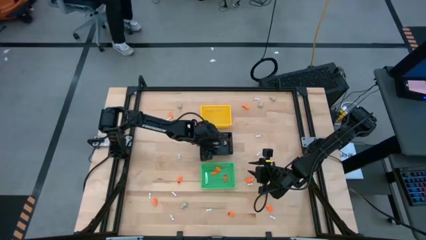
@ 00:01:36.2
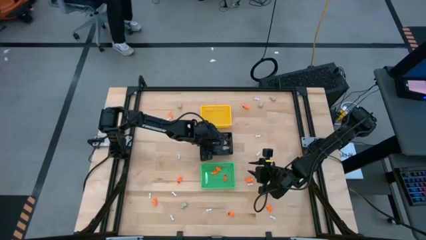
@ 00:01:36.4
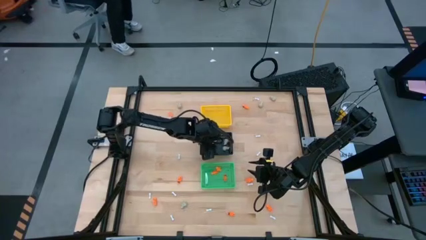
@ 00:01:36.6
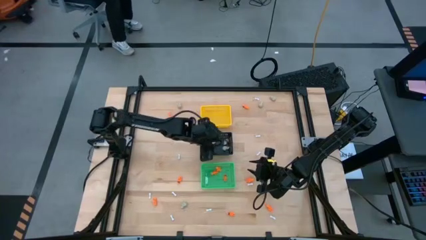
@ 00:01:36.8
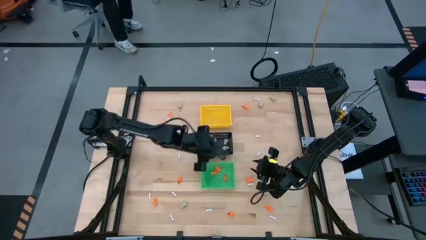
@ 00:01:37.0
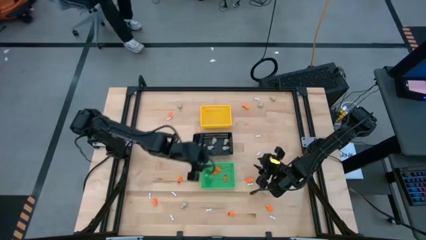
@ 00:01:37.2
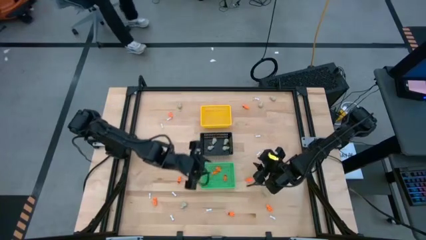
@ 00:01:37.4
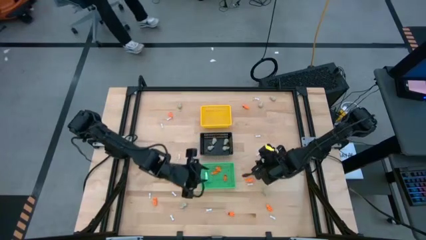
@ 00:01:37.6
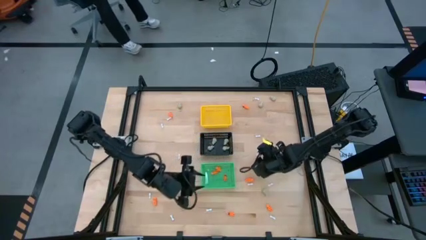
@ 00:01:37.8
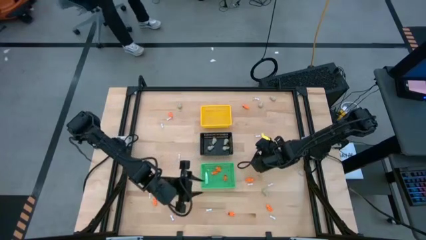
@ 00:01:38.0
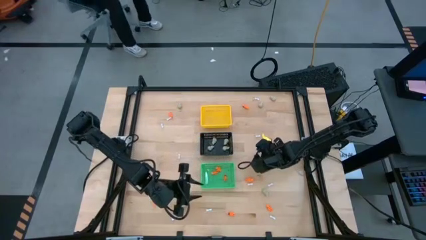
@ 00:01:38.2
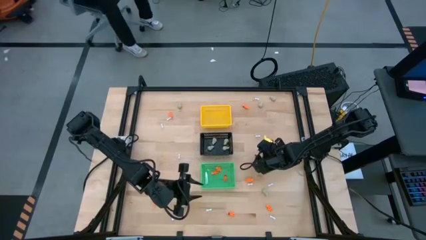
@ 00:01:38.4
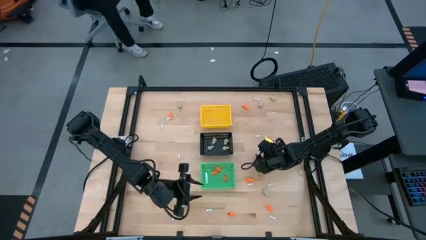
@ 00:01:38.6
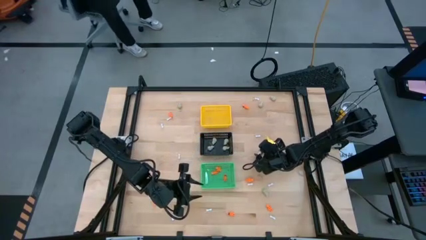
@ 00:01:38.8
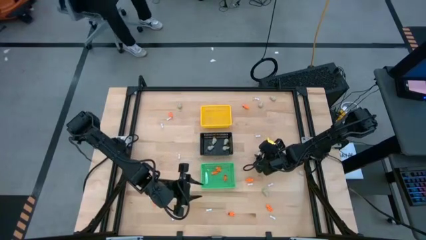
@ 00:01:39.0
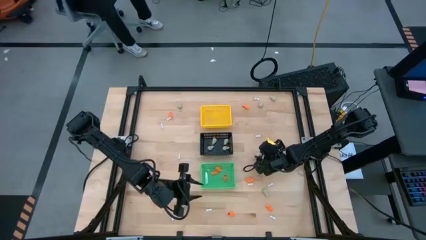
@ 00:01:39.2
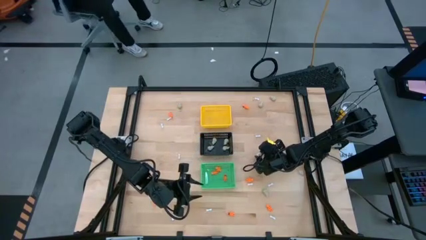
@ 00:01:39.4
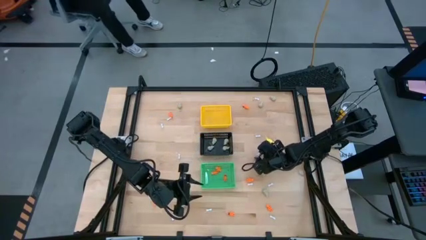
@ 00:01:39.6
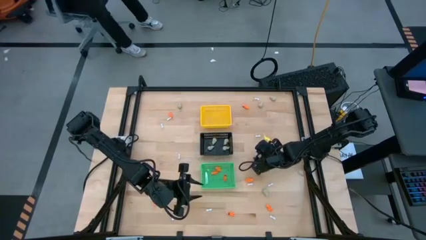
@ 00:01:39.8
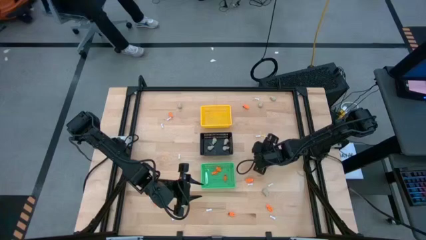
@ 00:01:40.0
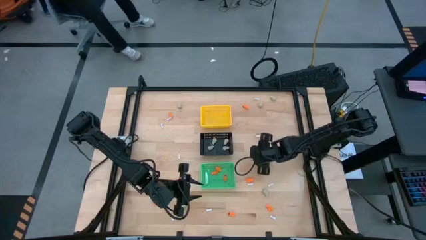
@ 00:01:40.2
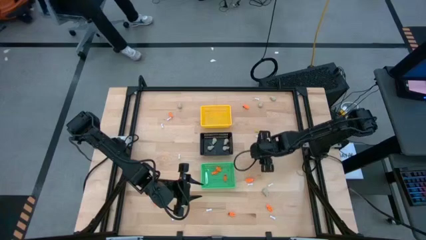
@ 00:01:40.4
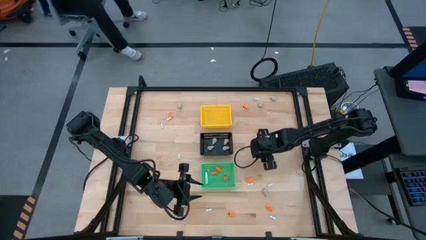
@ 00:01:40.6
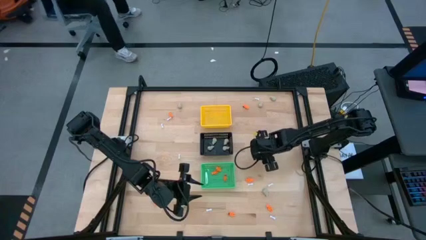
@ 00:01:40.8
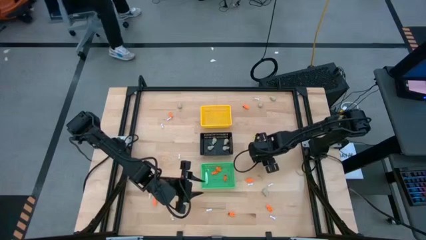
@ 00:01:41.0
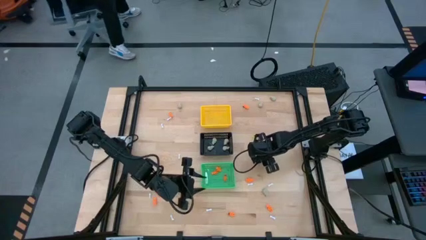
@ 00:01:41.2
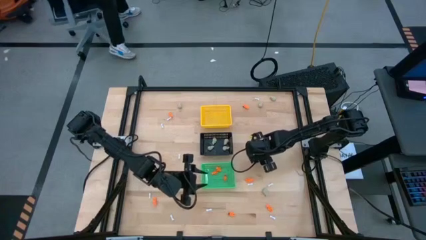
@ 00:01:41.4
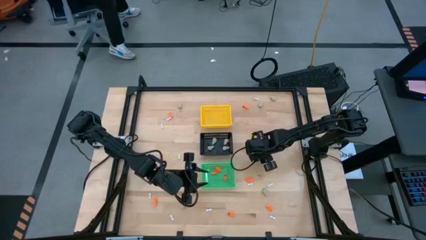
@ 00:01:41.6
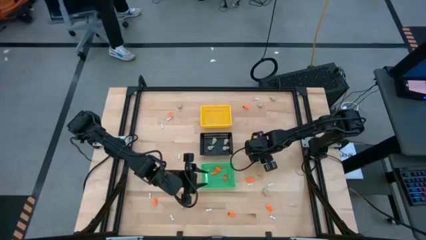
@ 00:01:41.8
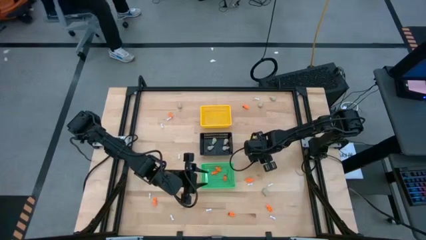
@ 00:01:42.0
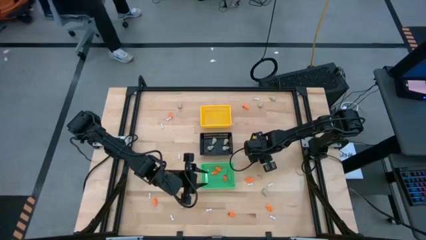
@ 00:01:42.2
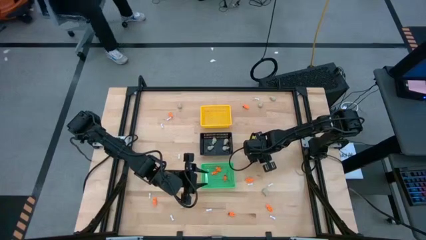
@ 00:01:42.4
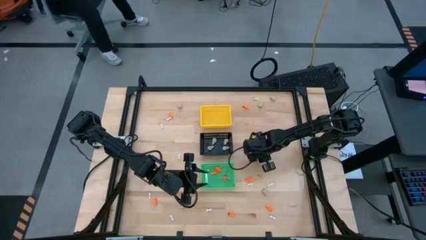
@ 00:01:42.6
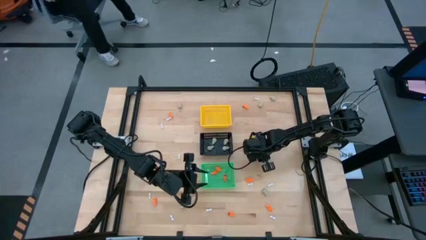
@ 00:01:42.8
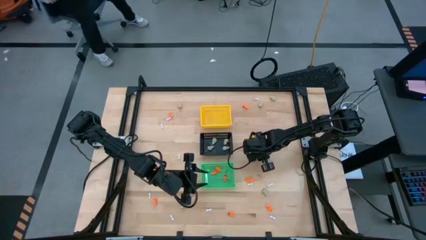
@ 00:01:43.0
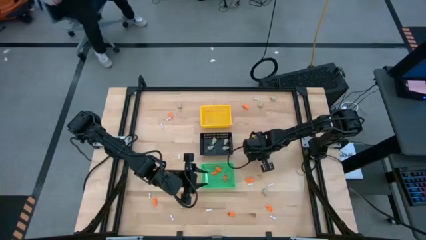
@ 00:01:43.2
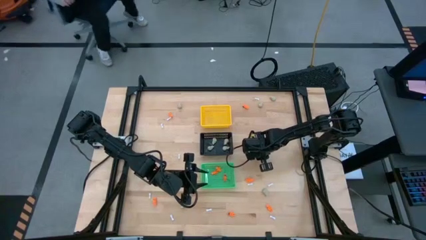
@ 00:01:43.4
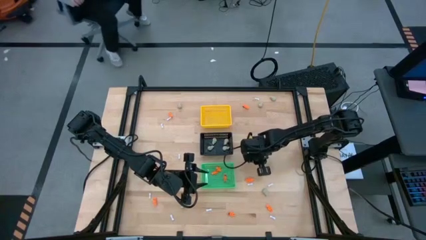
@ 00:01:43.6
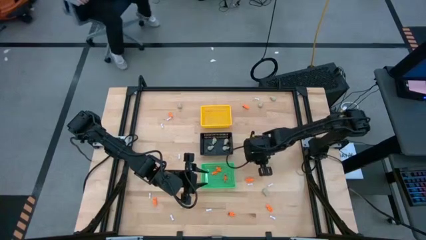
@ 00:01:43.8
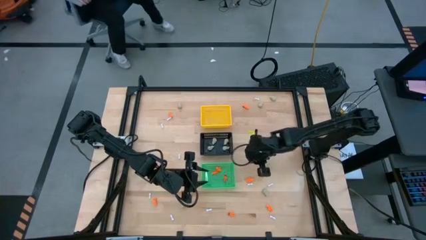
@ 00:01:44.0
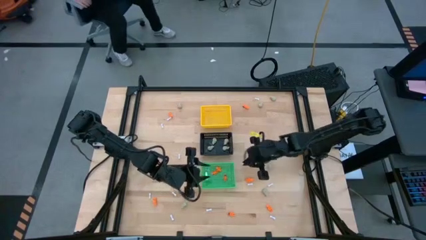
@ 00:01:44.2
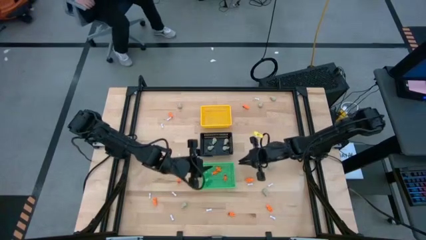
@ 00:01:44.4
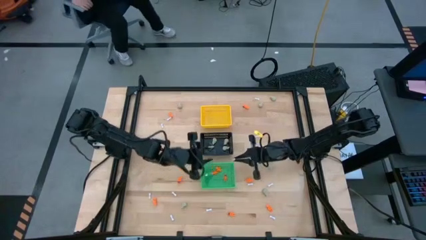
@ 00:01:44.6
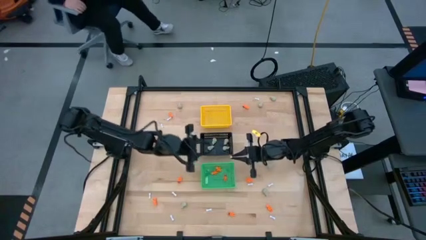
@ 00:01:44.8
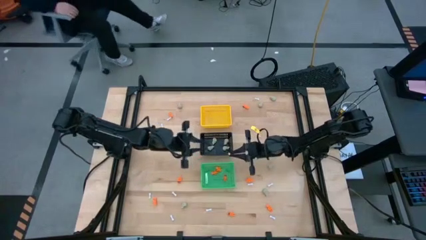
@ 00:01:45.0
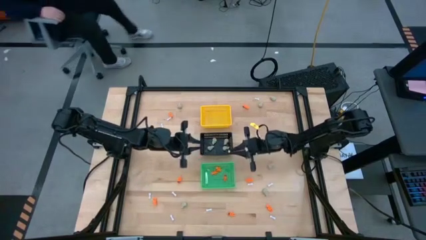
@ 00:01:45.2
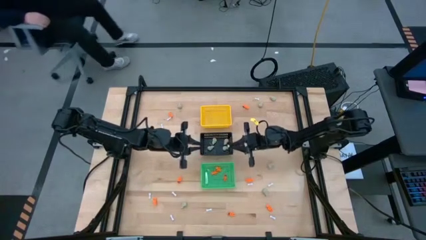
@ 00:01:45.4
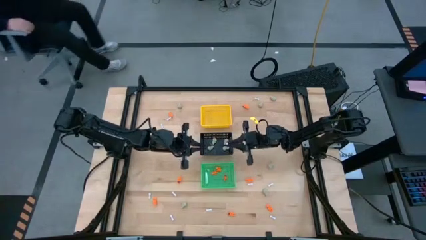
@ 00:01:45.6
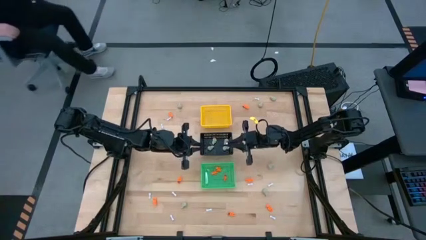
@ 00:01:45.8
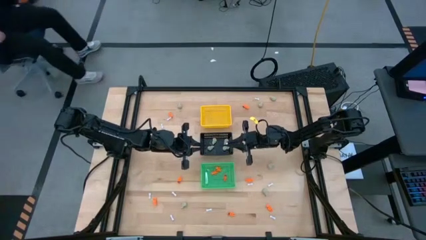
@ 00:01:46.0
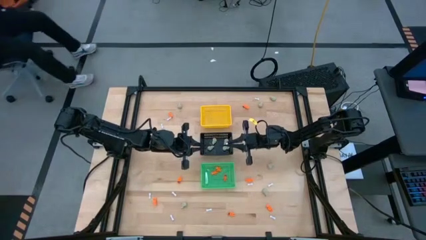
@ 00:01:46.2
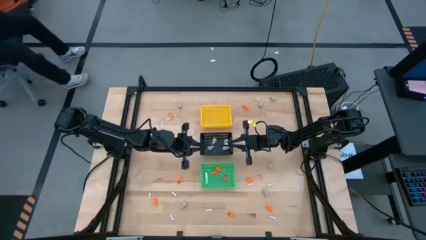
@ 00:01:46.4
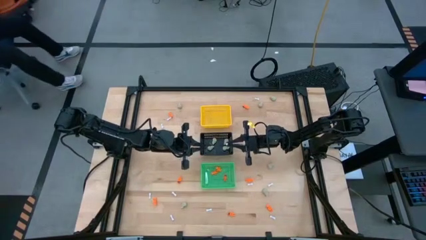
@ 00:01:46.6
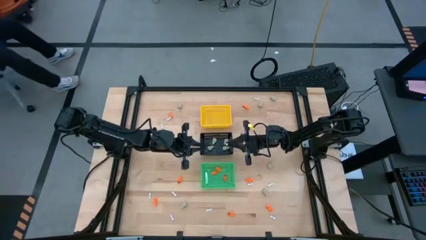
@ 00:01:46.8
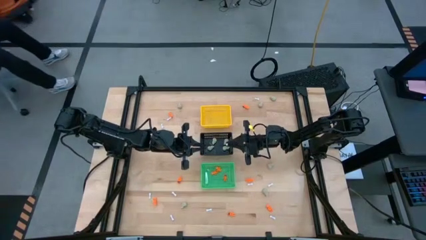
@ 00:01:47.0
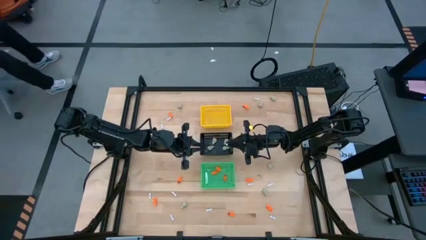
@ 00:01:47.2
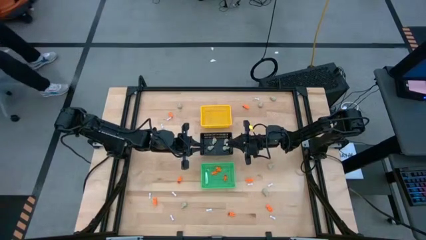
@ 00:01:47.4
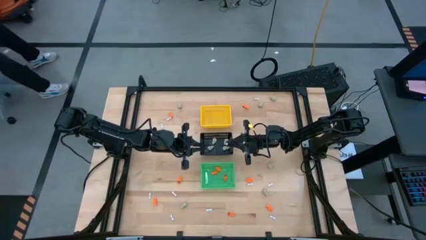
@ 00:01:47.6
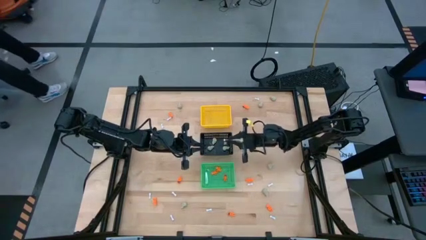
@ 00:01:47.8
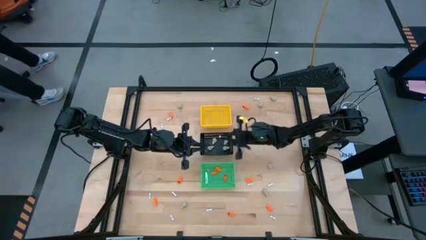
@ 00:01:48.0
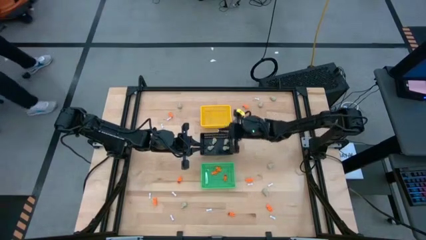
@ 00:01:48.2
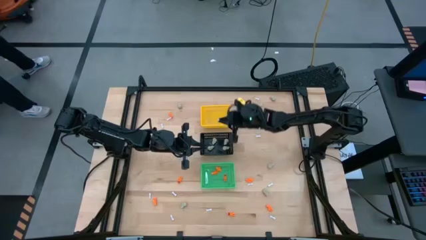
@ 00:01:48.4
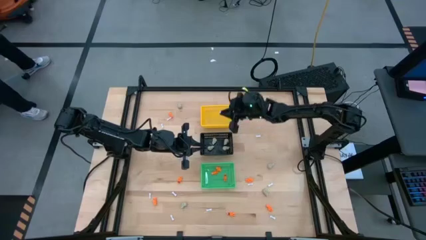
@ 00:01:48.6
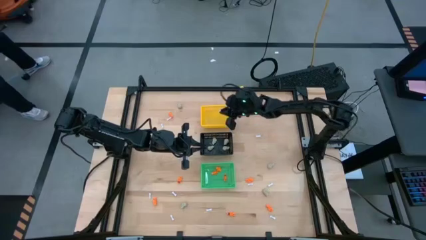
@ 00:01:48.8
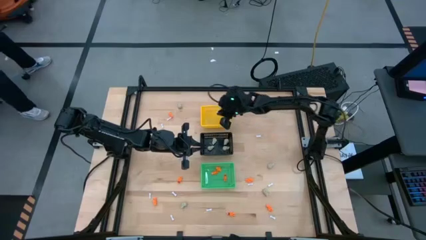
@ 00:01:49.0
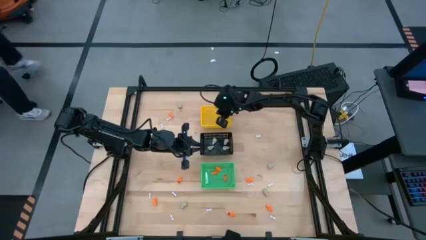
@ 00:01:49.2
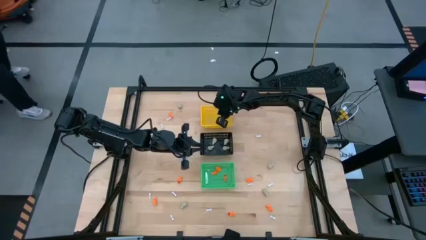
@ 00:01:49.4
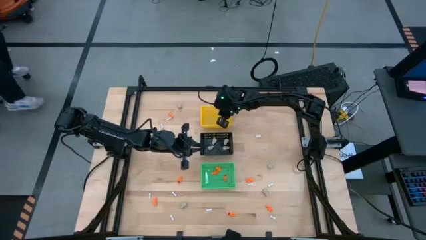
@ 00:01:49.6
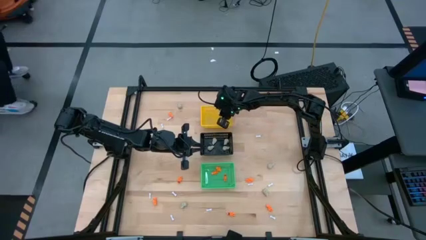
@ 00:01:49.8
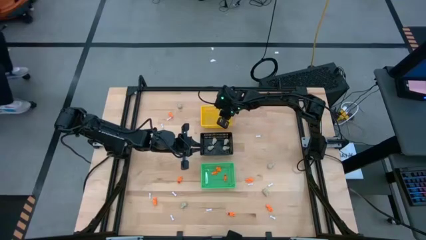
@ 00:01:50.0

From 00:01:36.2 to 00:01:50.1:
Task: Sort Halloween decoration
Put the white bone toy into the yellow basket
